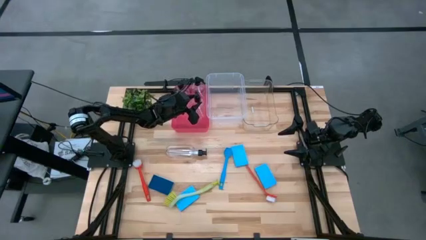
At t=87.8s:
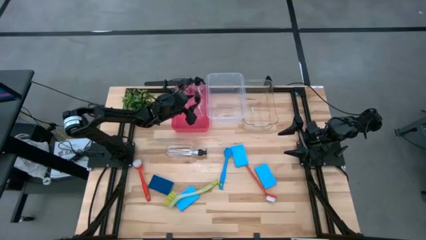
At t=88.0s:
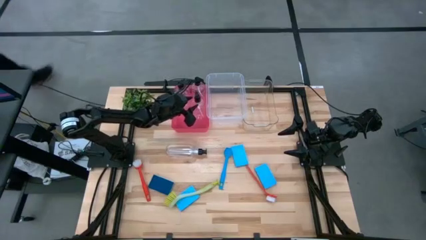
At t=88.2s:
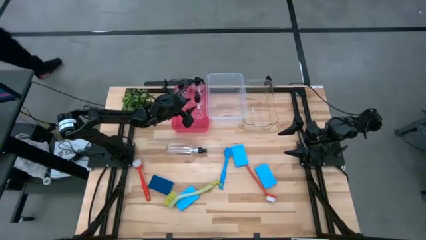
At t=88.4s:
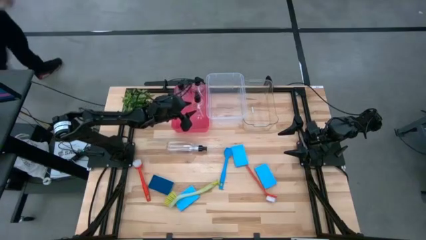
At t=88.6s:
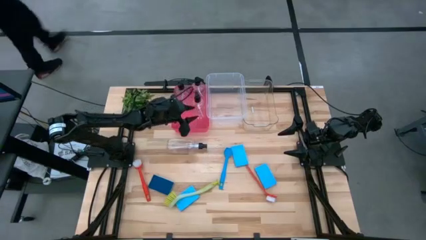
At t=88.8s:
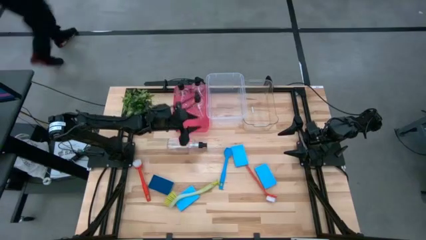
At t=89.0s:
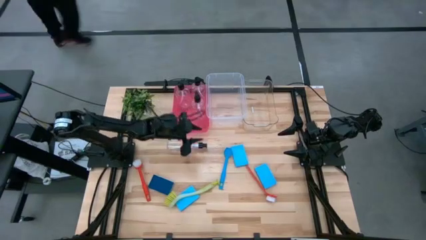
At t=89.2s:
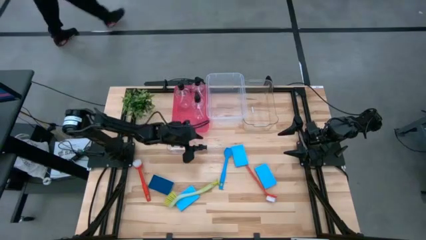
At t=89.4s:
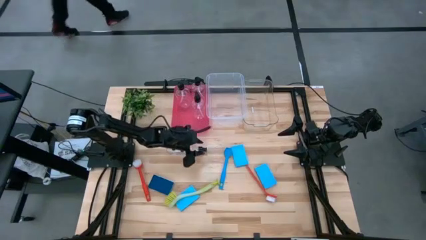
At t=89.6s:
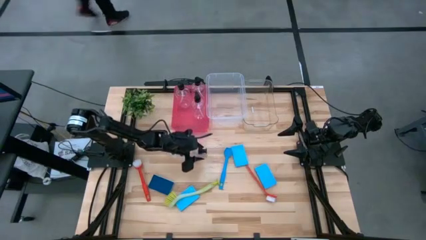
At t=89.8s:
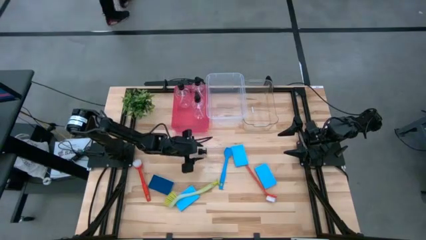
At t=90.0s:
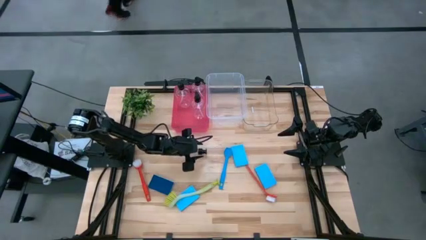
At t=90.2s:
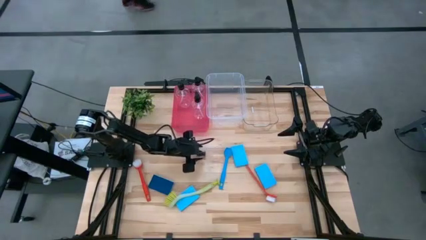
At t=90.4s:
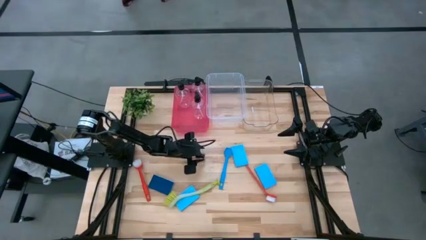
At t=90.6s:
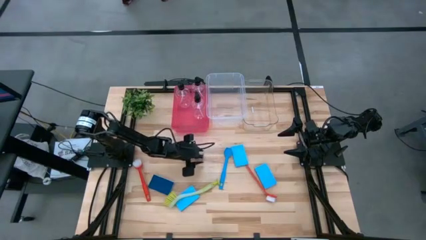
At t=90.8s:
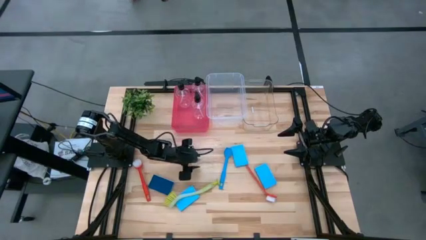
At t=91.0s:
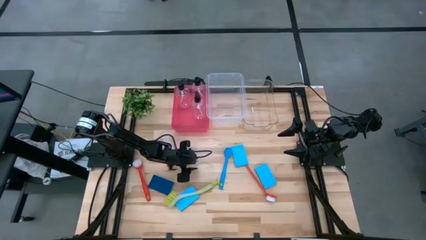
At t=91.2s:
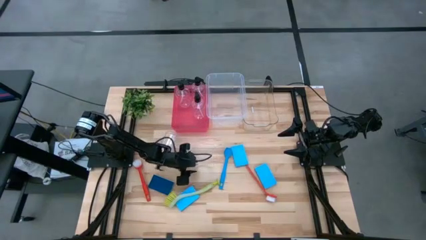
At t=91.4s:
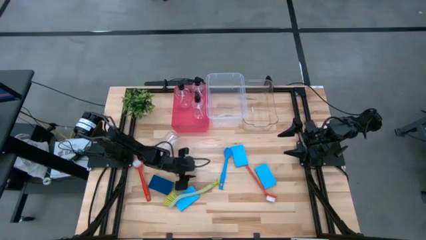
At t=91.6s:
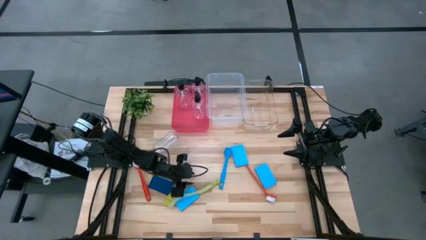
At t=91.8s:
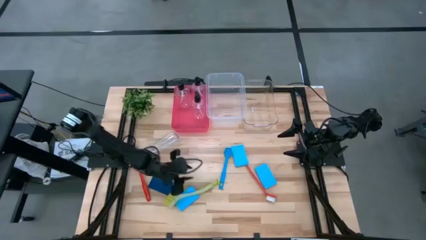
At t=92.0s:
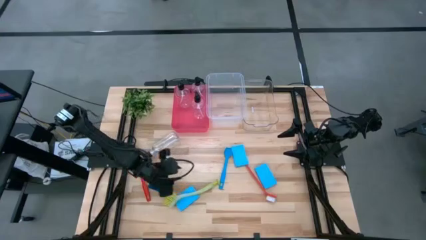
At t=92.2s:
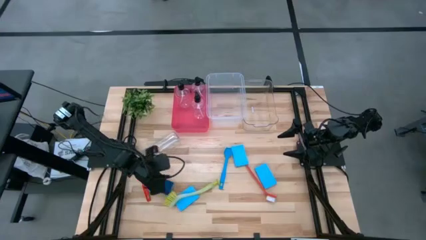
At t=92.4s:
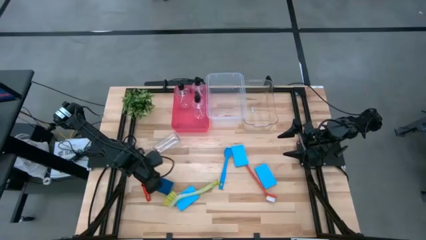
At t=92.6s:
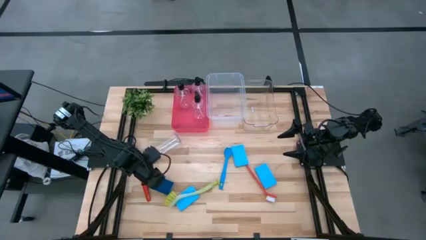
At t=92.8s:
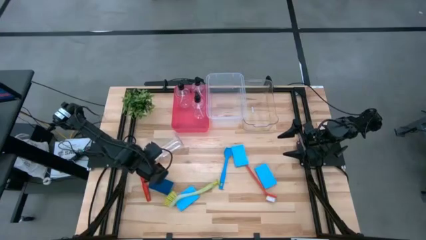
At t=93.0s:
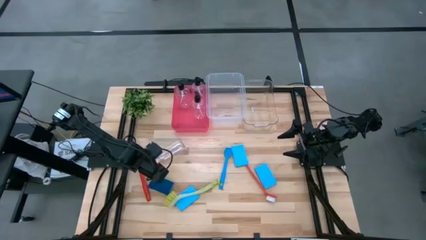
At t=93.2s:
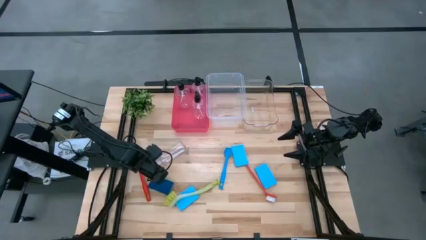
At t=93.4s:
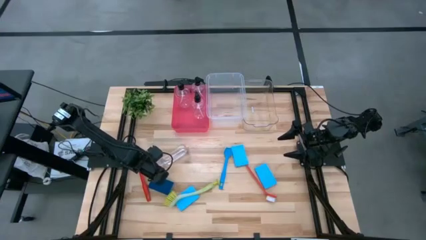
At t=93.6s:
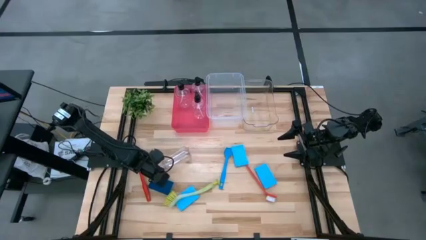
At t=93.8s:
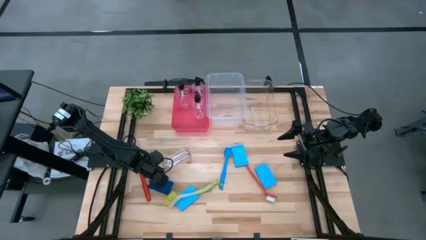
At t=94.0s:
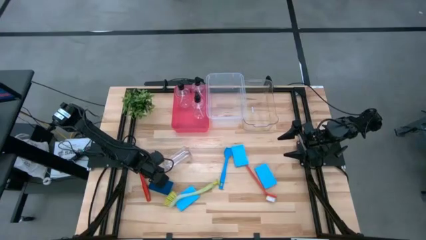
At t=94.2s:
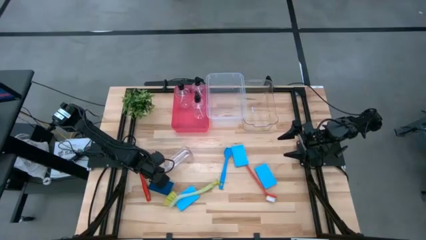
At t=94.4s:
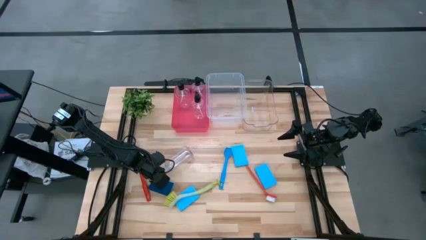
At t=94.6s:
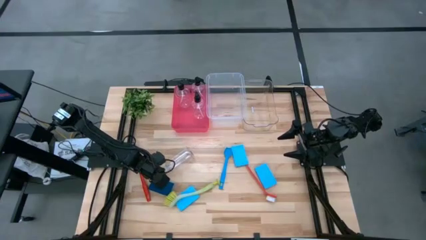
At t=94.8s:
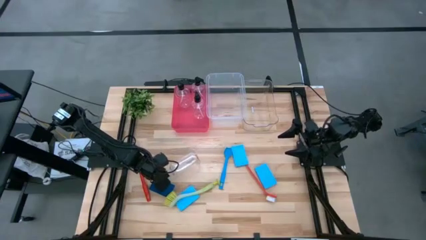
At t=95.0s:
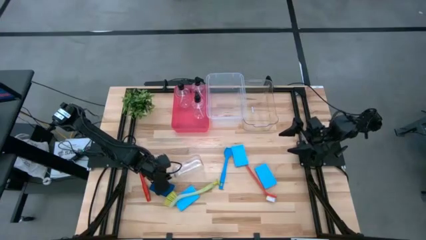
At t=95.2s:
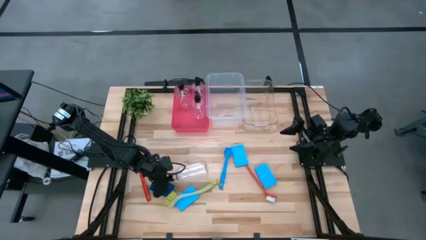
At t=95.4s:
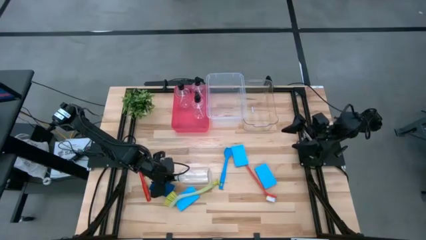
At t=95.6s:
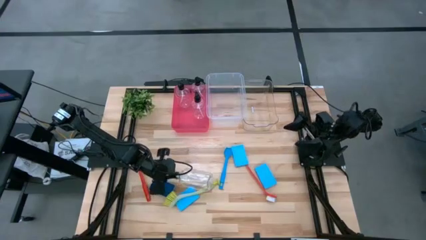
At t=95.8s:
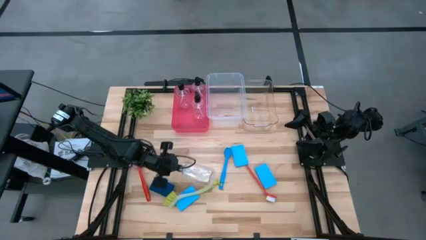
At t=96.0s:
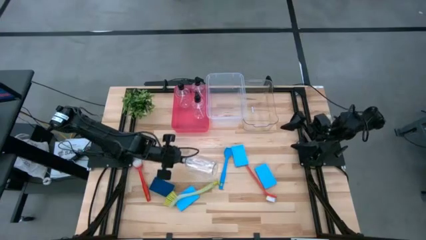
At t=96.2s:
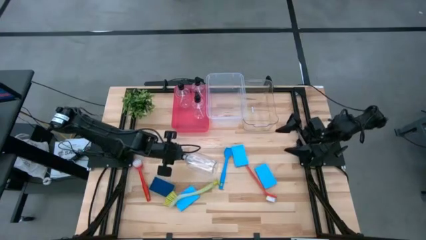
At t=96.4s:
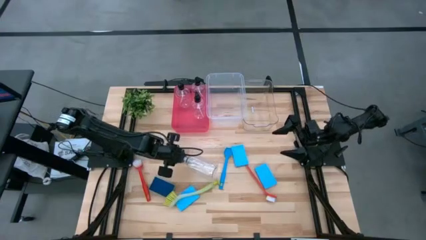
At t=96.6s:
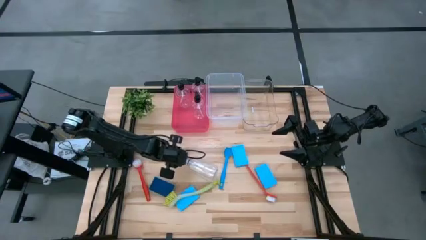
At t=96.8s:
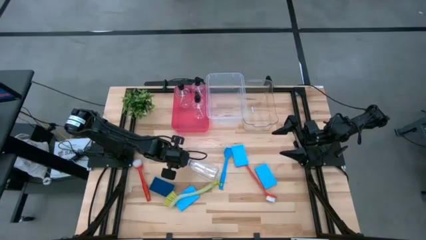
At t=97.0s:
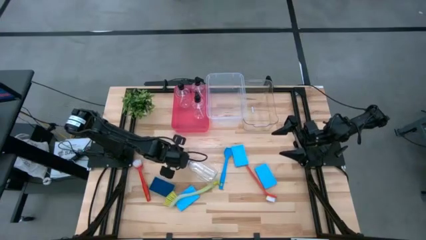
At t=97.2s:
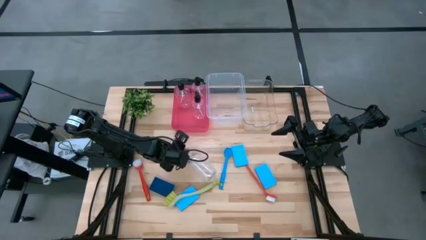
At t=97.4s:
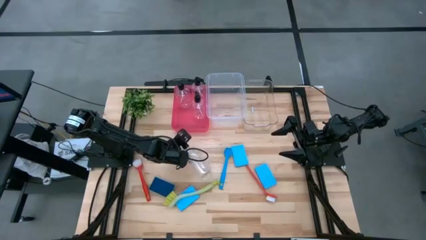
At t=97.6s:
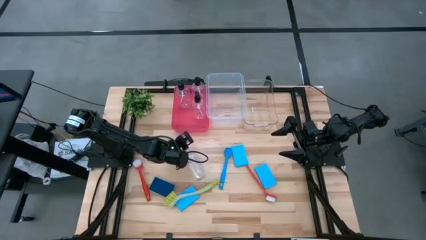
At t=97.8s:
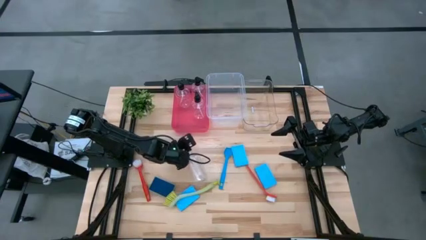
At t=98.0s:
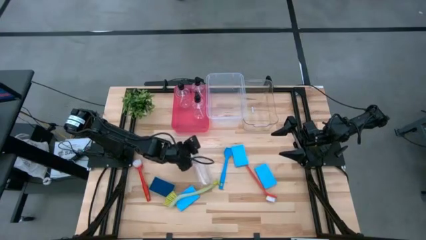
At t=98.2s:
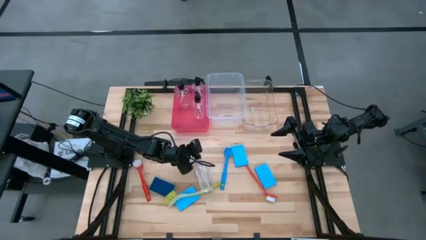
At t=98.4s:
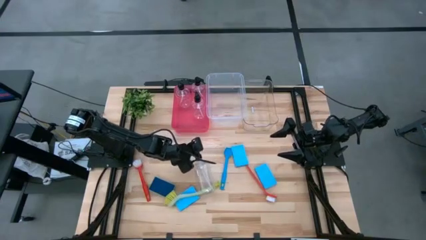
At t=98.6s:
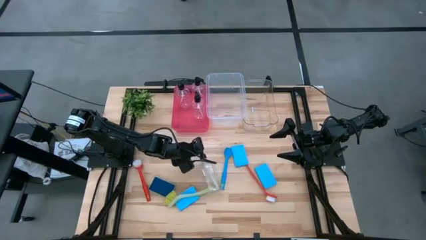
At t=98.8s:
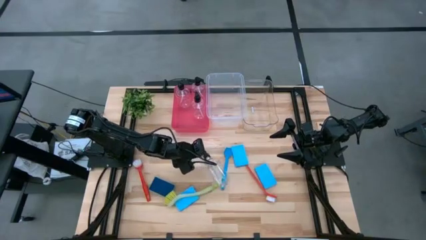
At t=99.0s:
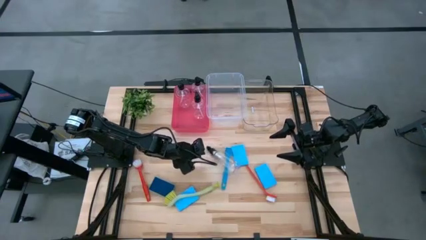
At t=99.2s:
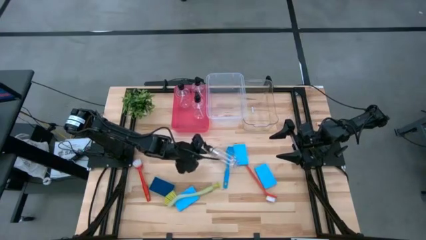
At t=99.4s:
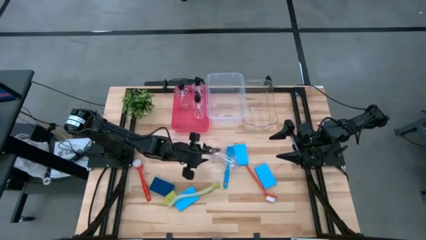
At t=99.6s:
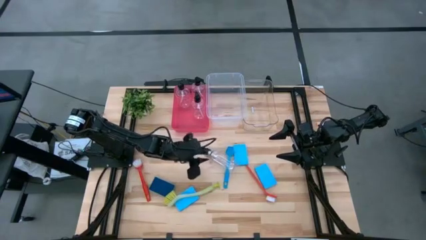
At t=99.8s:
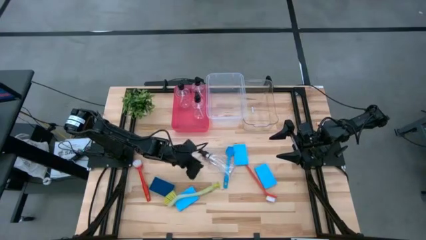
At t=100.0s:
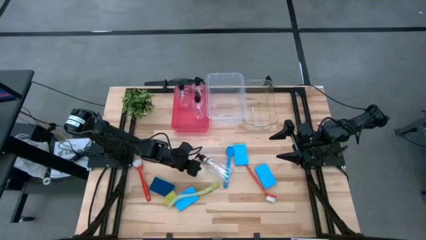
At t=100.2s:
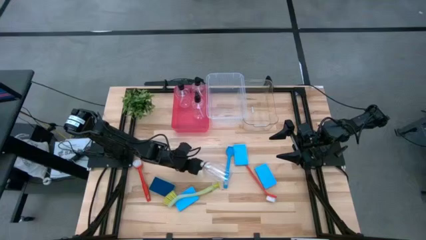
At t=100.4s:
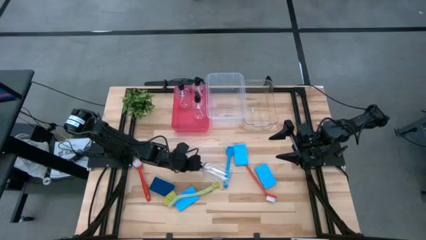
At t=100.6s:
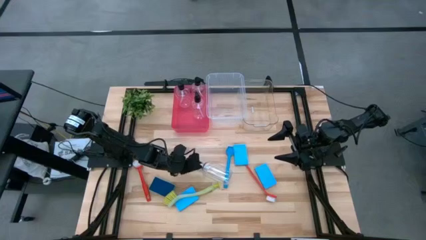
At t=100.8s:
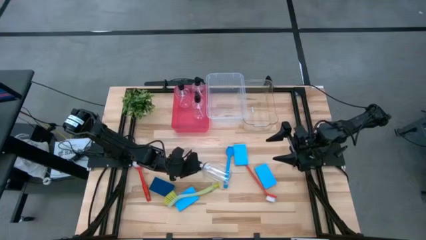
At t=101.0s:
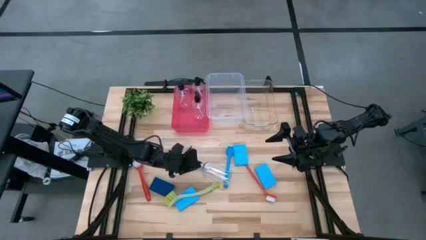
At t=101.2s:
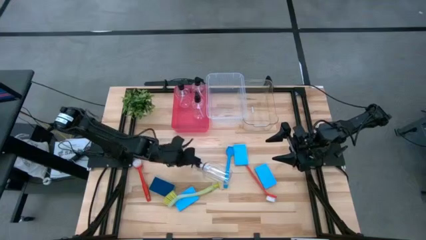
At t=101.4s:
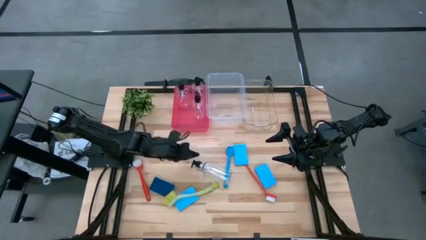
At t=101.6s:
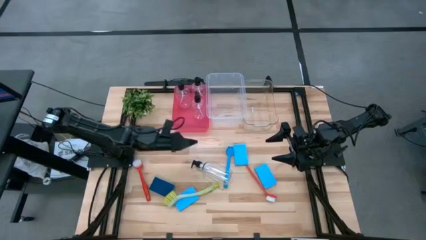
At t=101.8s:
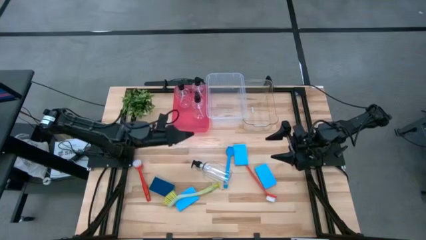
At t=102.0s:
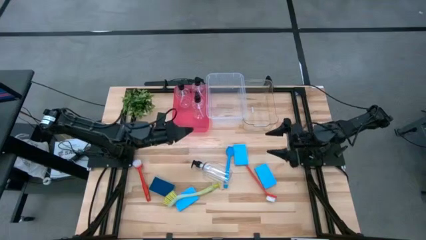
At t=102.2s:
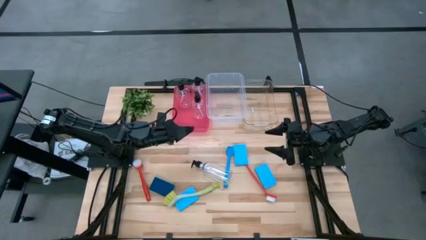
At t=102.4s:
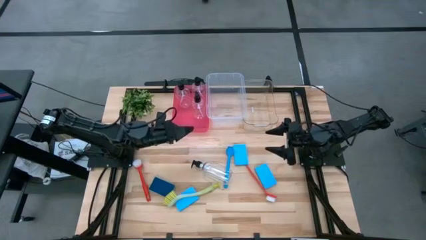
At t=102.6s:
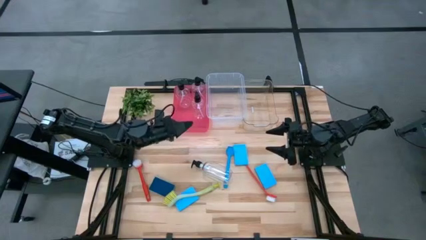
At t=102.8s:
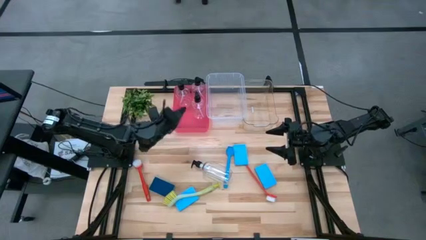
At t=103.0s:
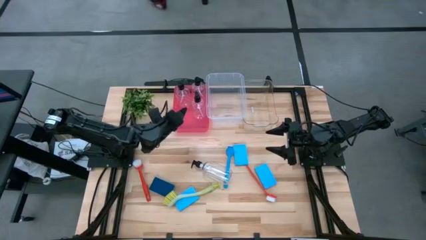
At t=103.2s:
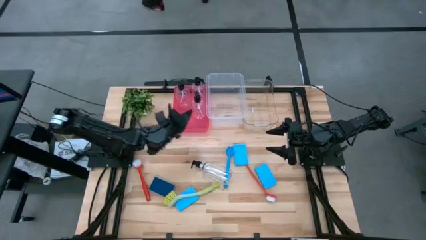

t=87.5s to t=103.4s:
Task: Pick & Place Kitchen Sink Supplies
Put the transparent dishwashing liquid dispenser into the red bin
